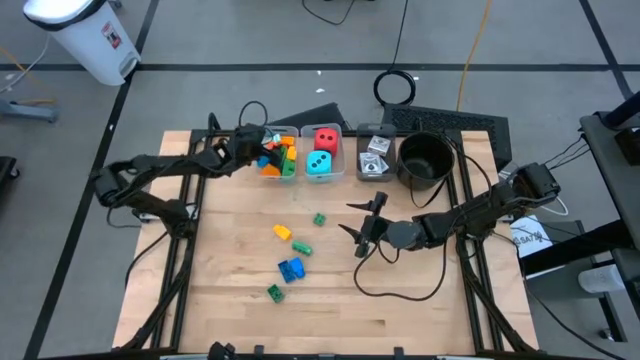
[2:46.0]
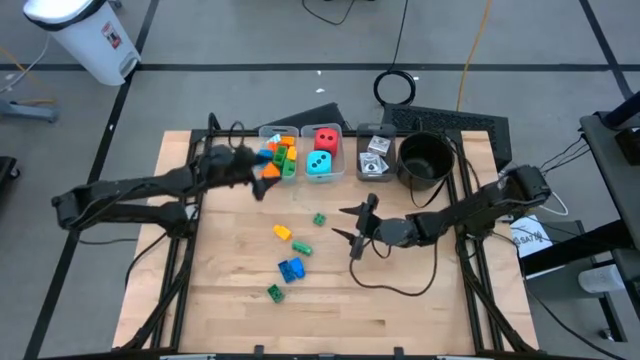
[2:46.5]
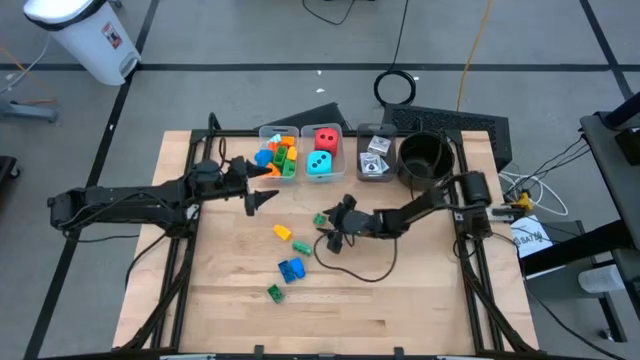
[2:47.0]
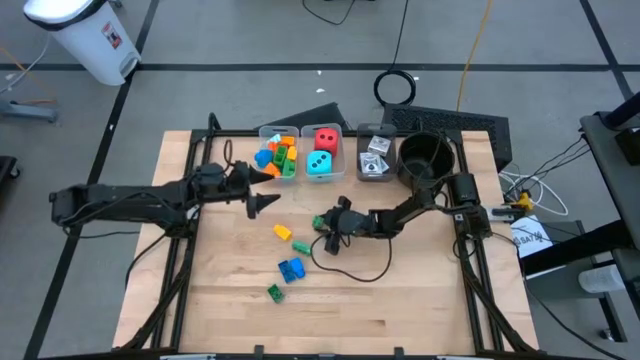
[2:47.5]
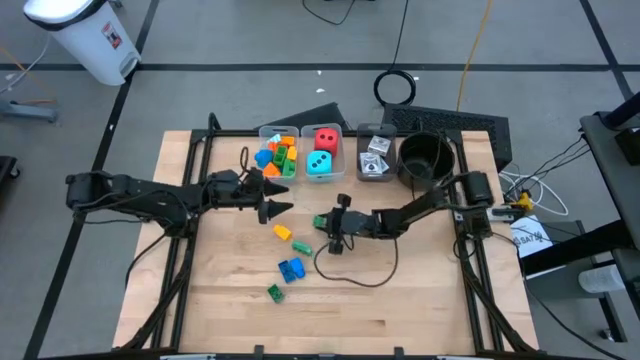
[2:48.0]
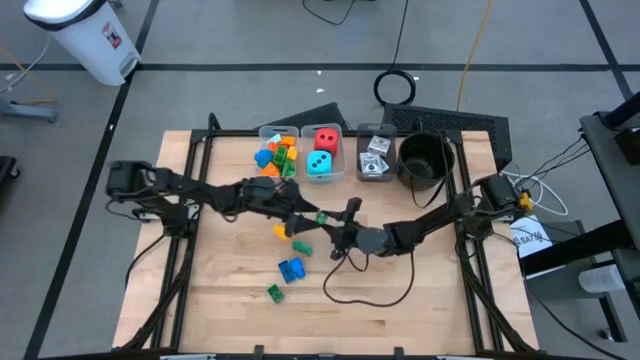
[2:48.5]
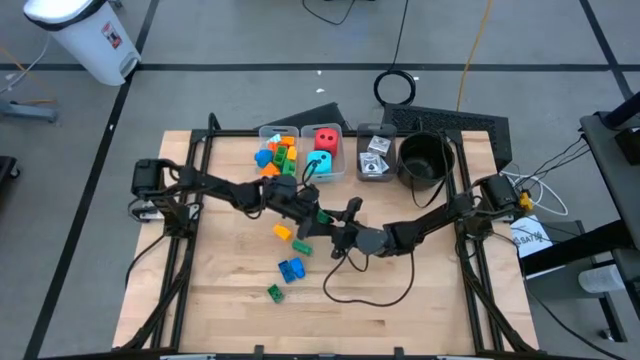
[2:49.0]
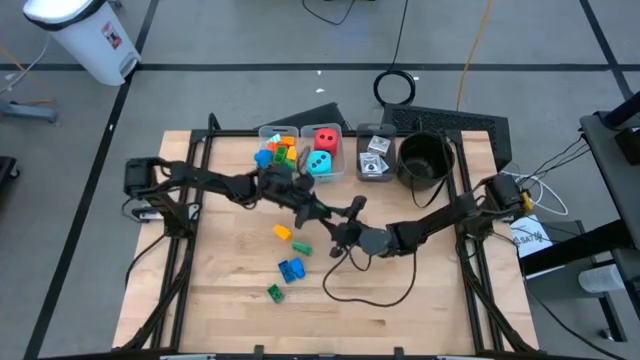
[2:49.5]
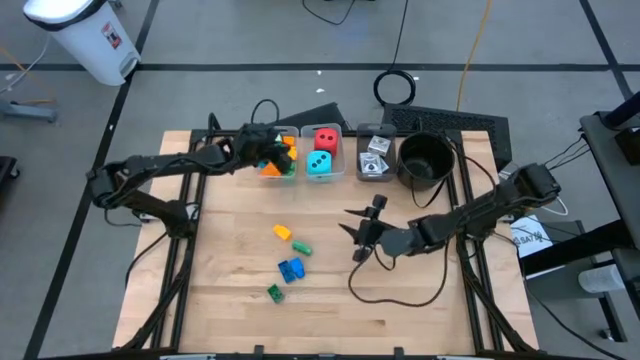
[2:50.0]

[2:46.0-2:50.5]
Task: Pick & Place Toys
Put the dark green game piece into the left transparent bin

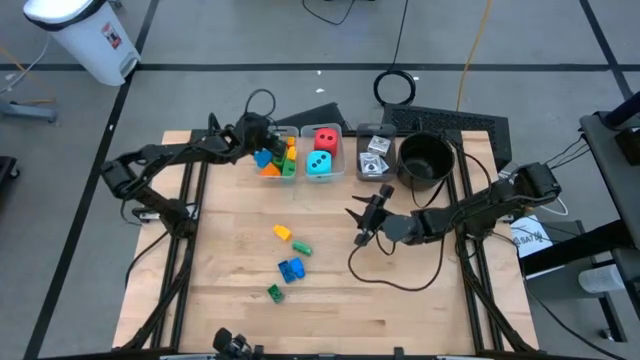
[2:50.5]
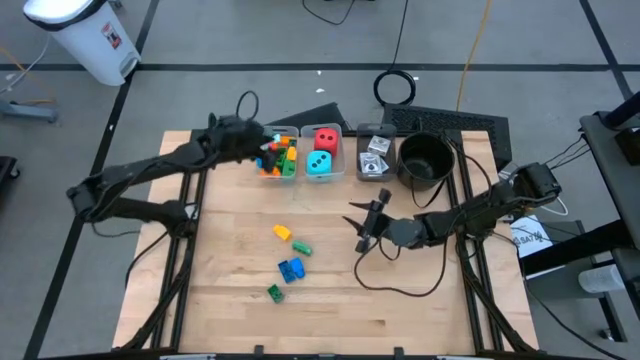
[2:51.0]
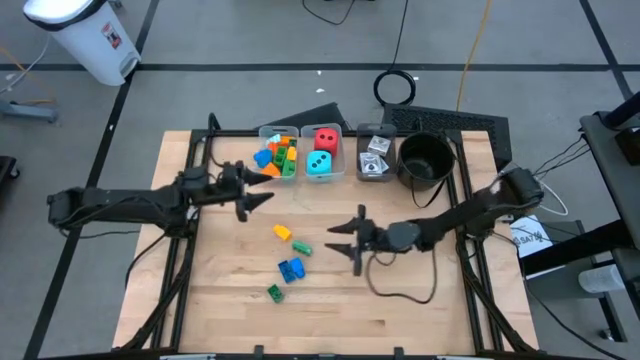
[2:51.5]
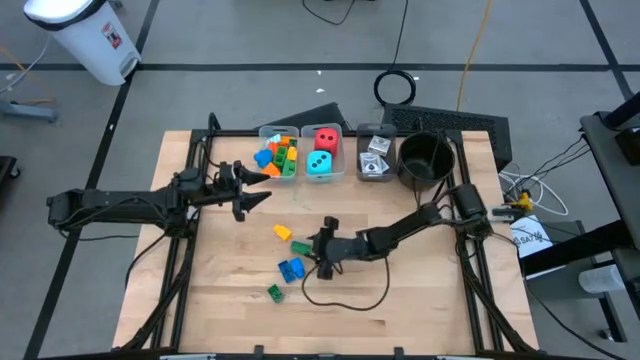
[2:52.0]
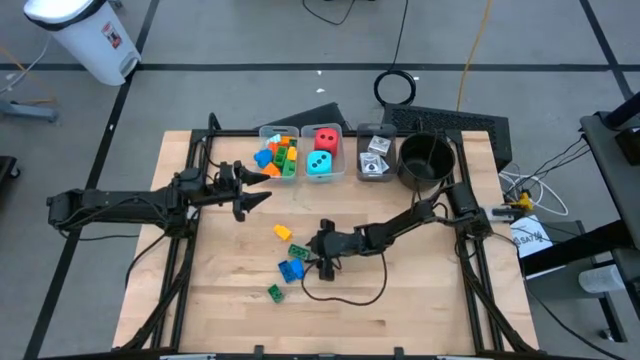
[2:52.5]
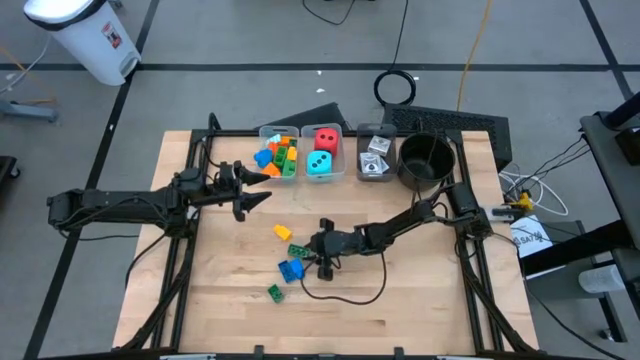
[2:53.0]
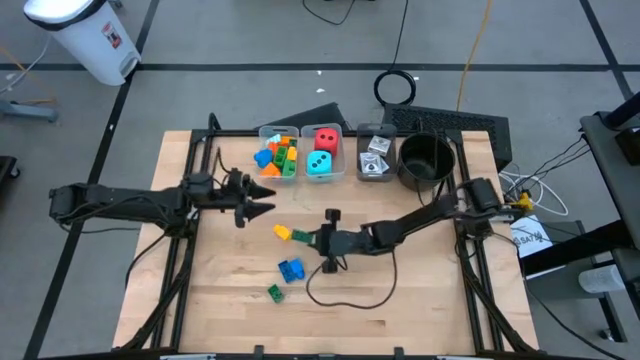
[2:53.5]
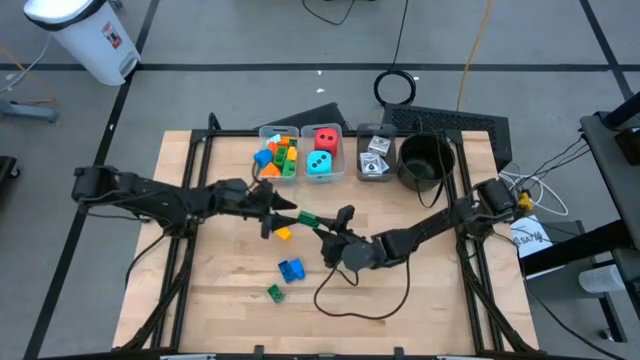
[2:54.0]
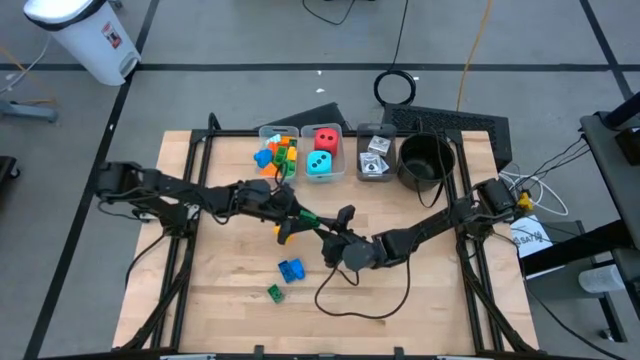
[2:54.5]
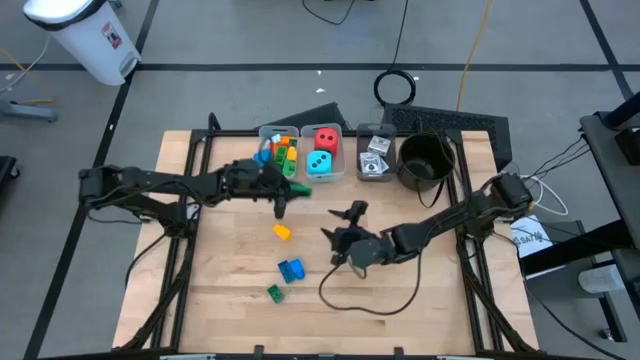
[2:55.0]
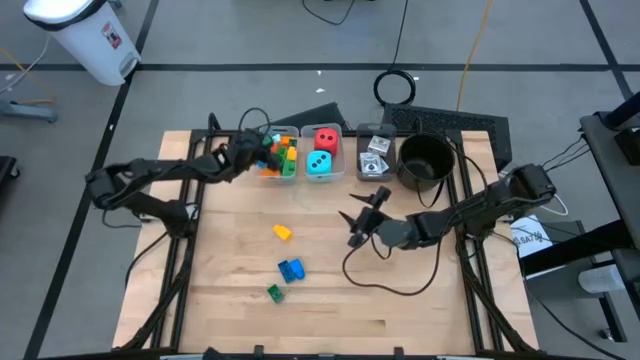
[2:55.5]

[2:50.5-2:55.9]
Put the dark green game piece into the left transparent bin

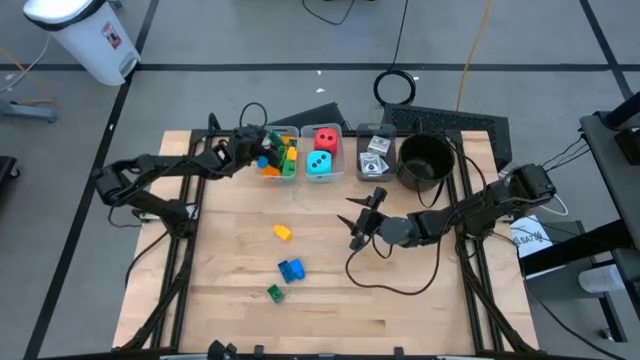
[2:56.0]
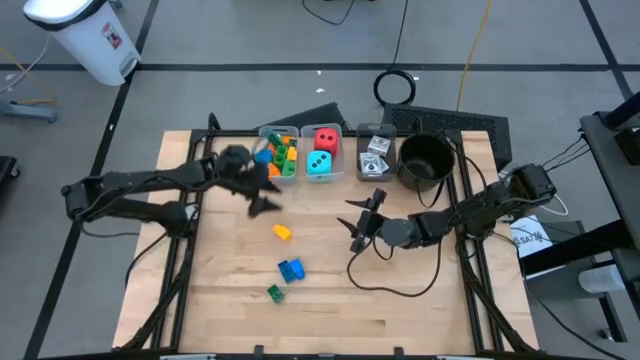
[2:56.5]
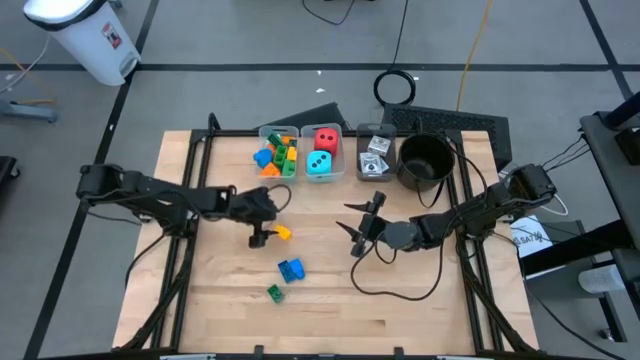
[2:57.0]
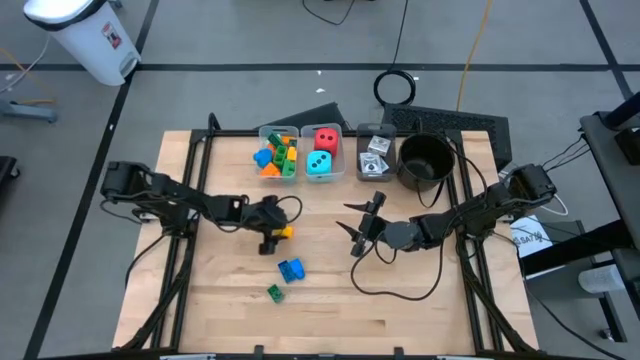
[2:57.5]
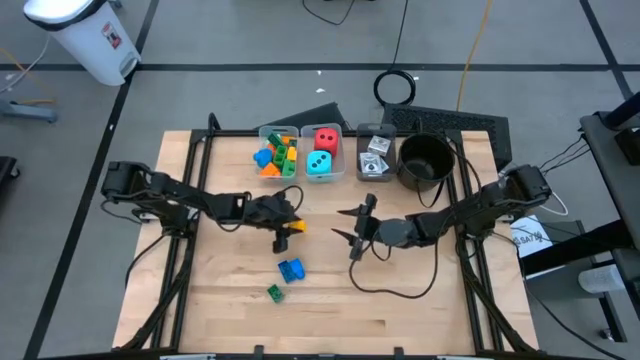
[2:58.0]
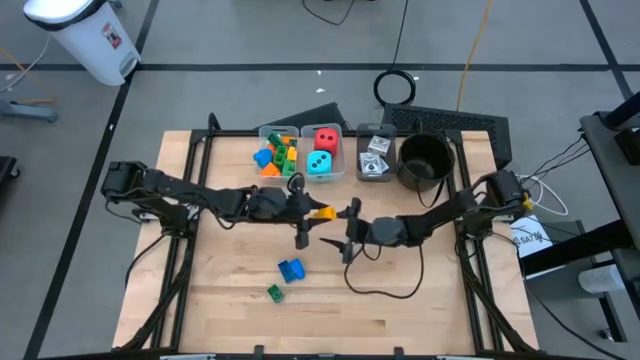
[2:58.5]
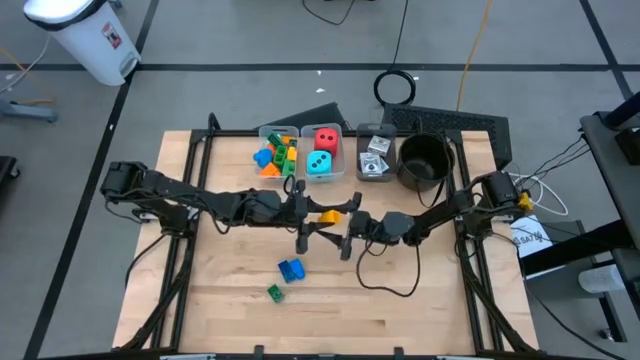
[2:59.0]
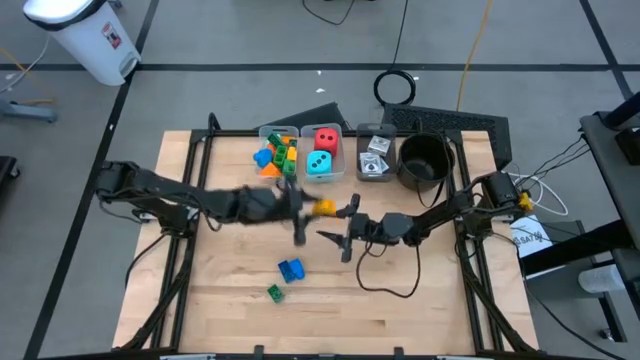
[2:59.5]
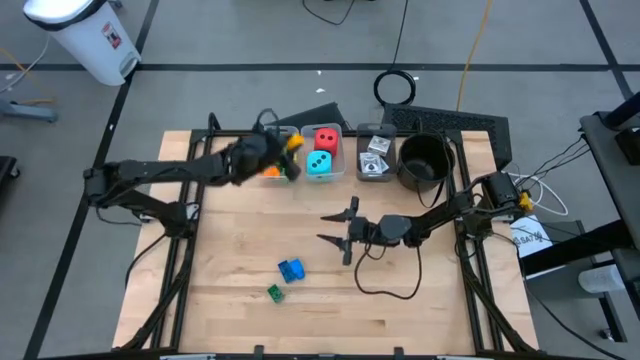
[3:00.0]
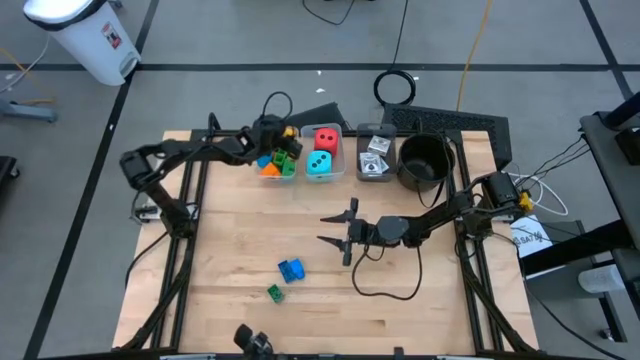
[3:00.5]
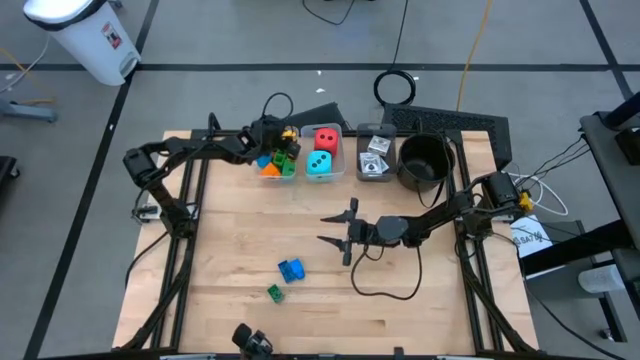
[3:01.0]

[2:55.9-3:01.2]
Put the yellow game piece into the left transparent bin

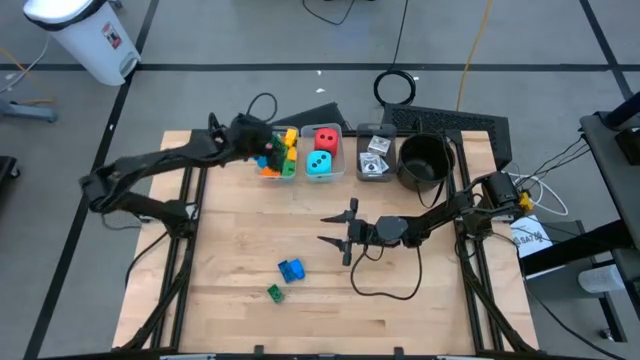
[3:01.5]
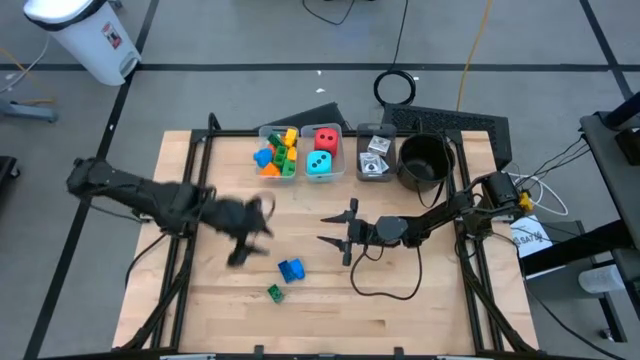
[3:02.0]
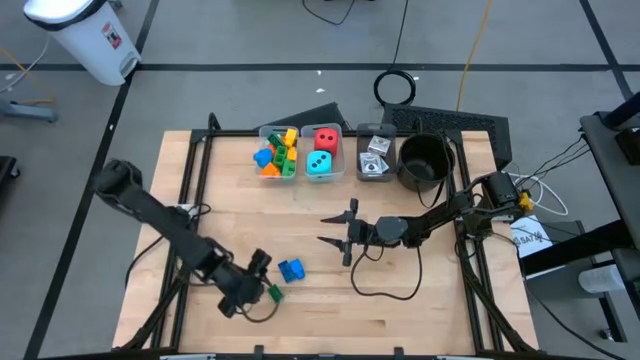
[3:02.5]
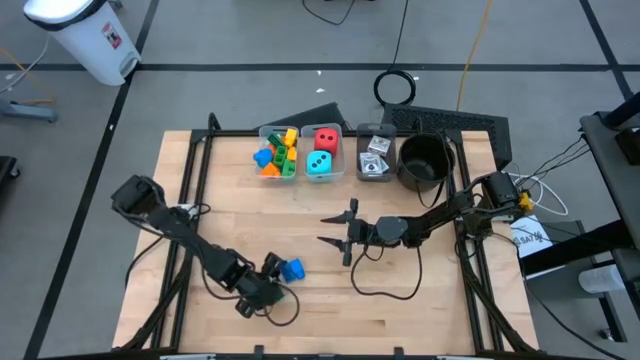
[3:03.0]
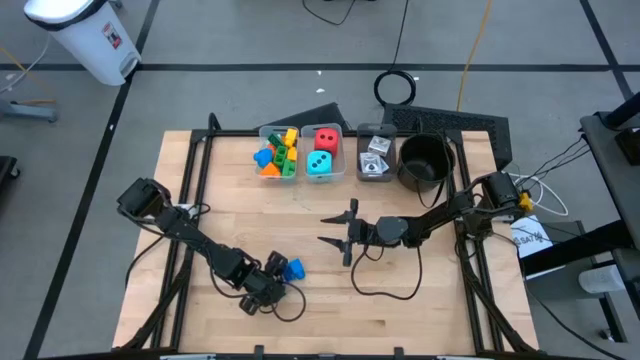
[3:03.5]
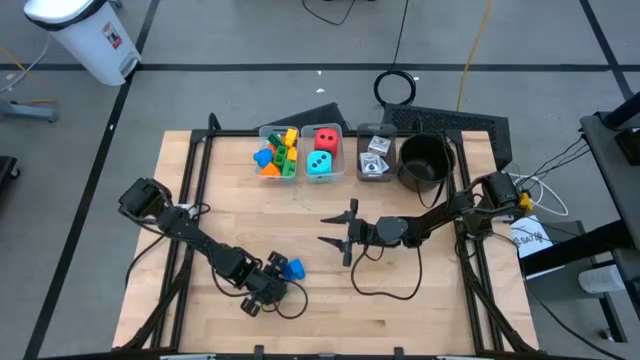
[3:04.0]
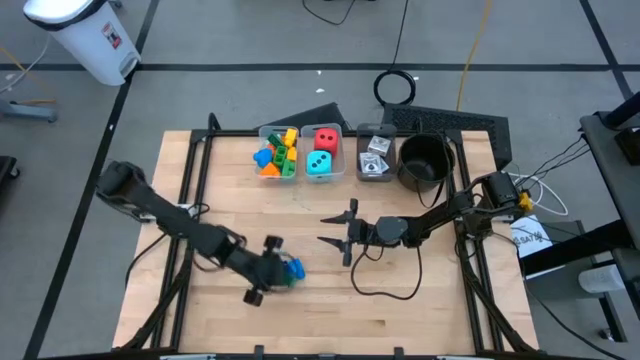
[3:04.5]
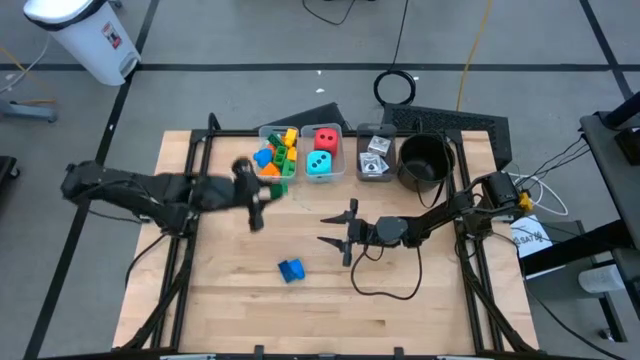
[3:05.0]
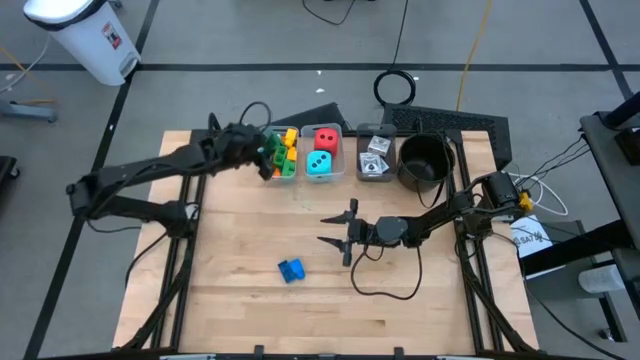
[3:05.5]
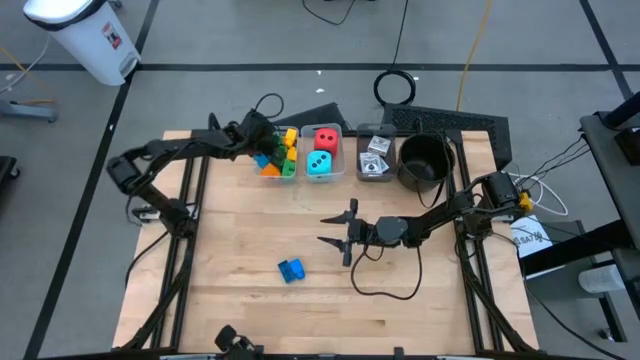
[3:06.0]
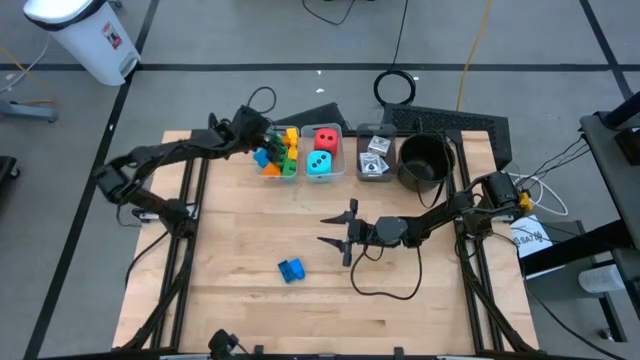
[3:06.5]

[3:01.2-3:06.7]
Put the dark green game piece into the left transparent bin
